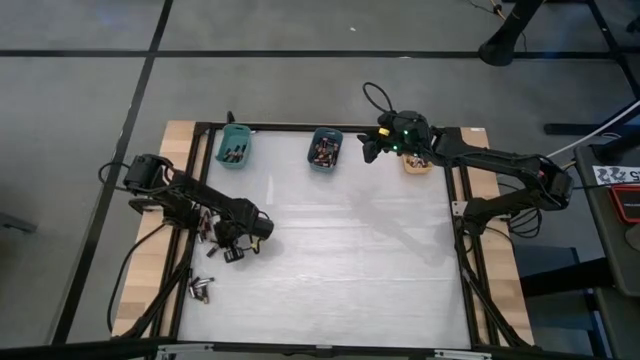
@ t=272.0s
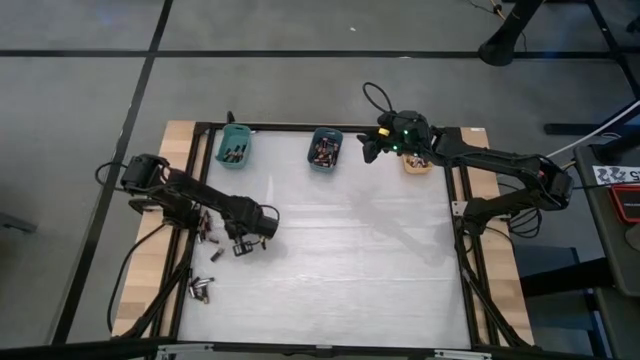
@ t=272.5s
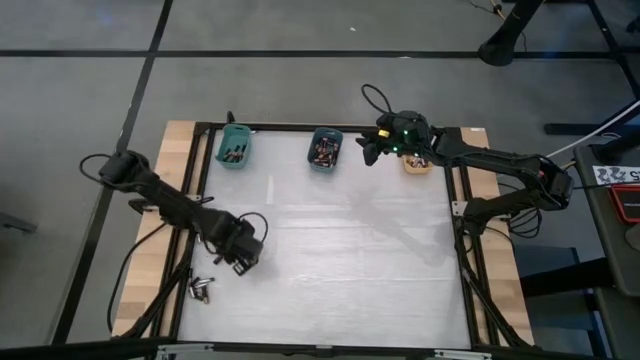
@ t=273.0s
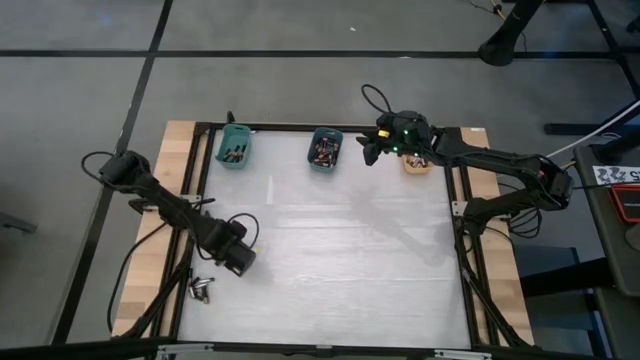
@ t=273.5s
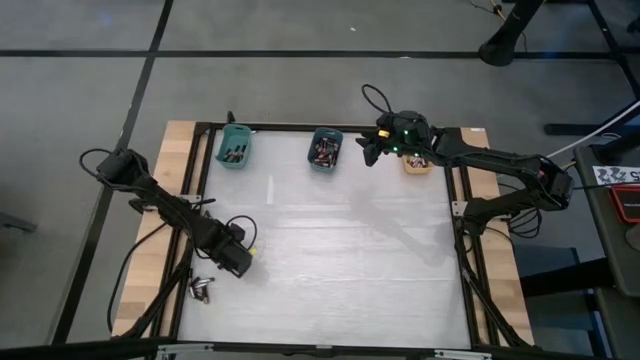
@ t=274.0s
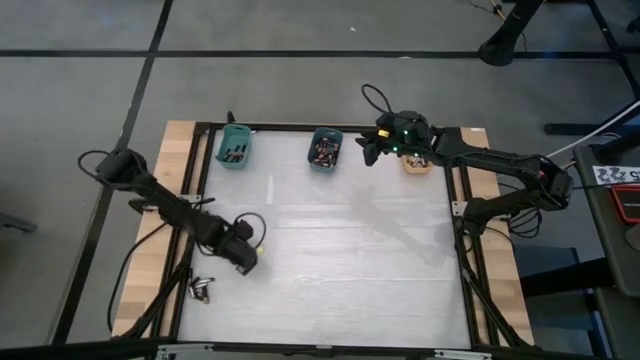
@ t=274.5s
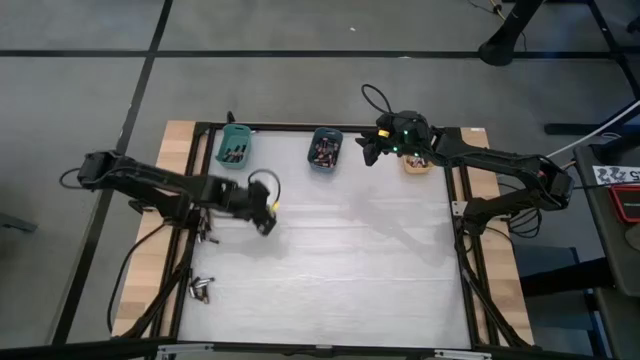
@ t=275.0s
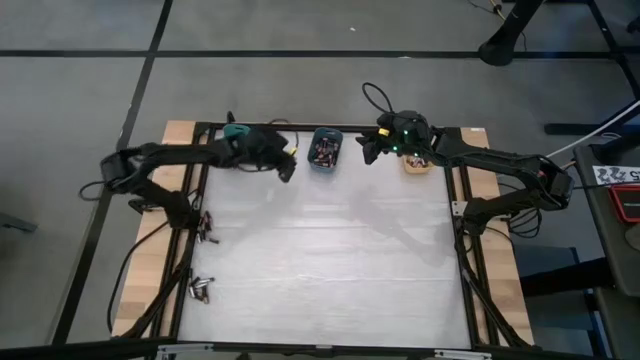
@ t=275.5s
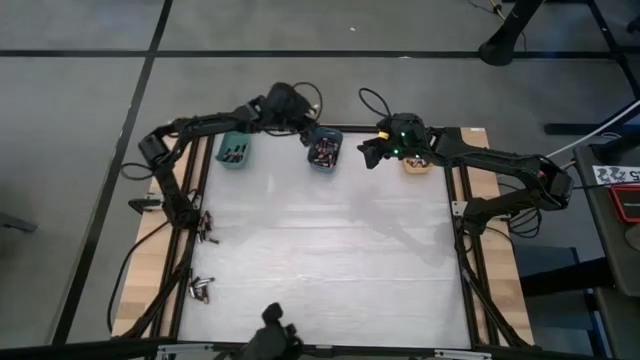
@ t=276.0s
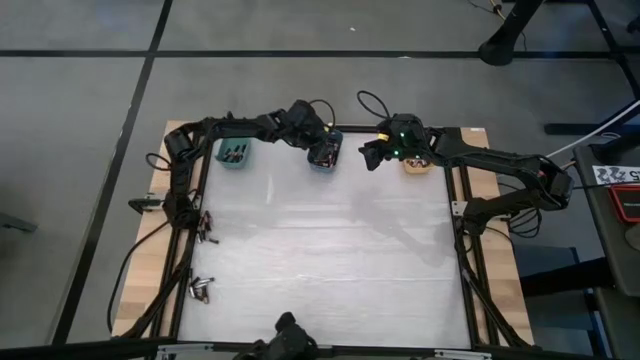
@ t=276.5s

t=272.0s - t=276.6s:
Task: Sort batteries
Put the brown battery into the blue bin

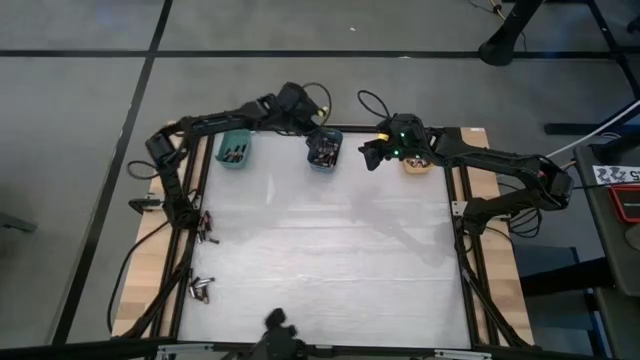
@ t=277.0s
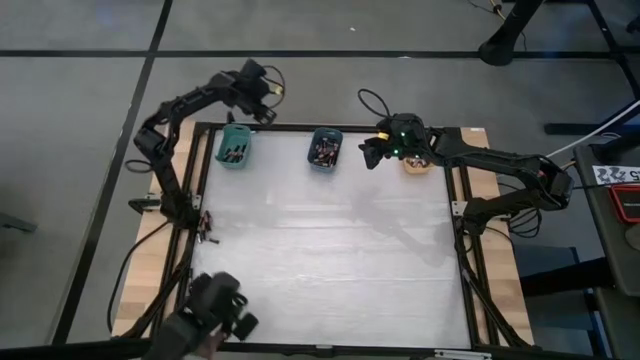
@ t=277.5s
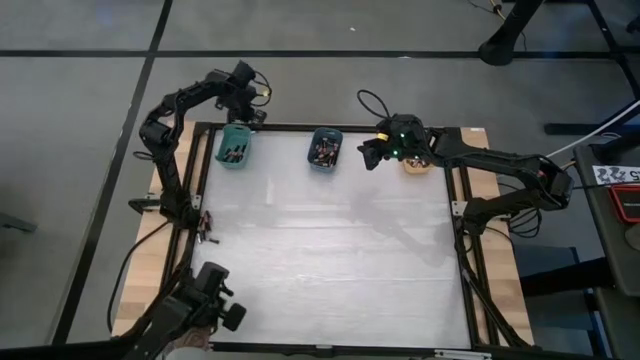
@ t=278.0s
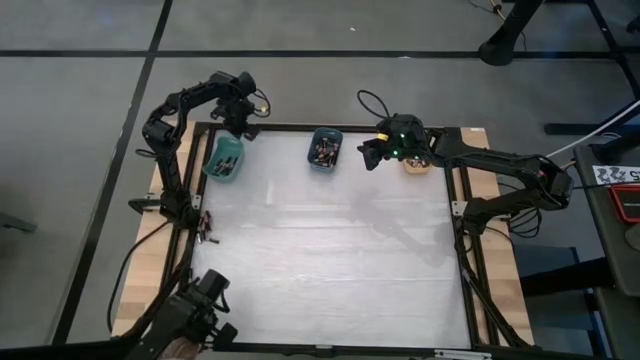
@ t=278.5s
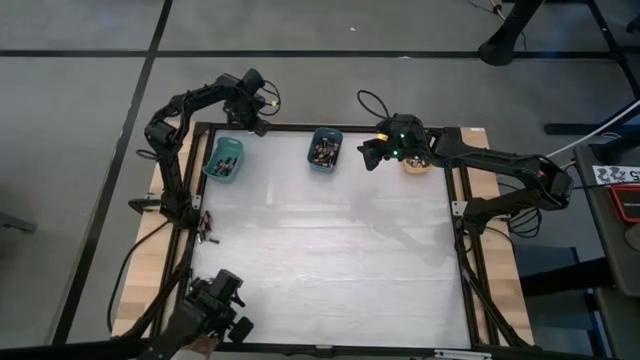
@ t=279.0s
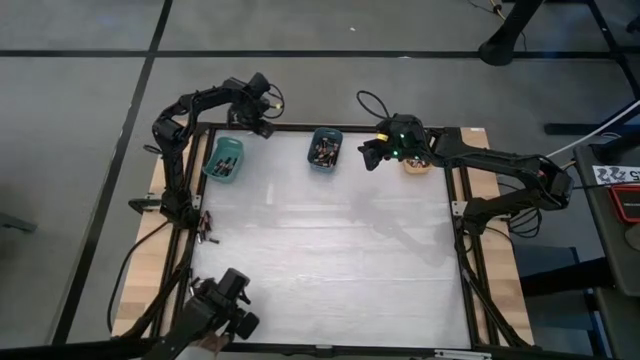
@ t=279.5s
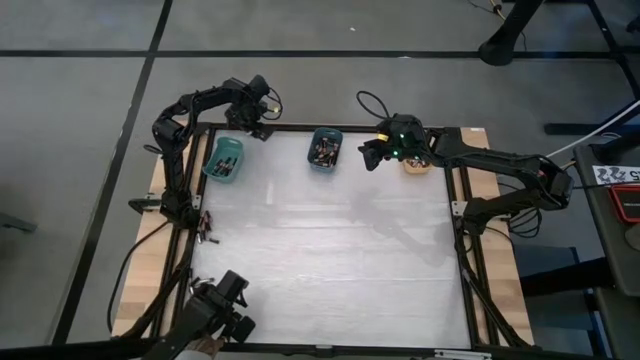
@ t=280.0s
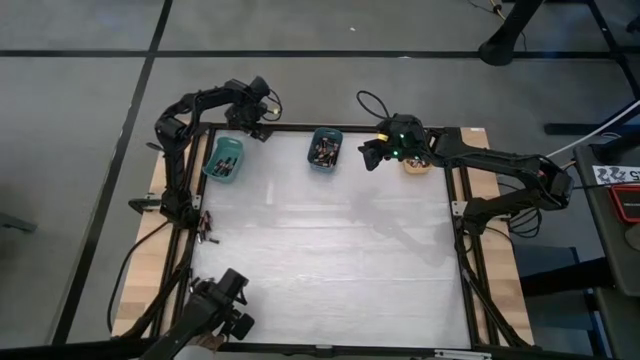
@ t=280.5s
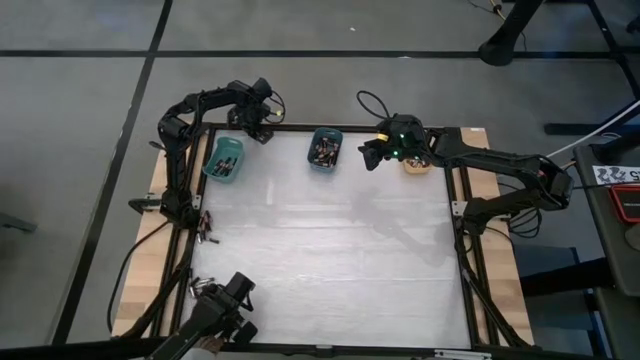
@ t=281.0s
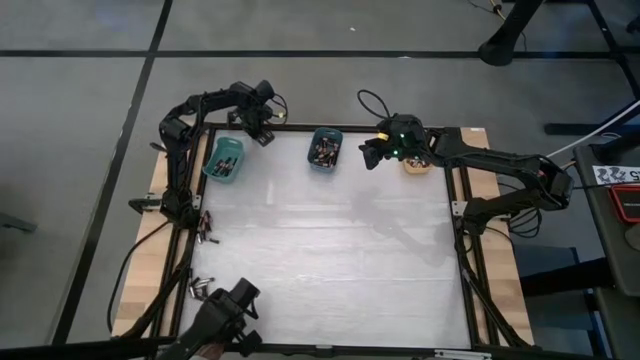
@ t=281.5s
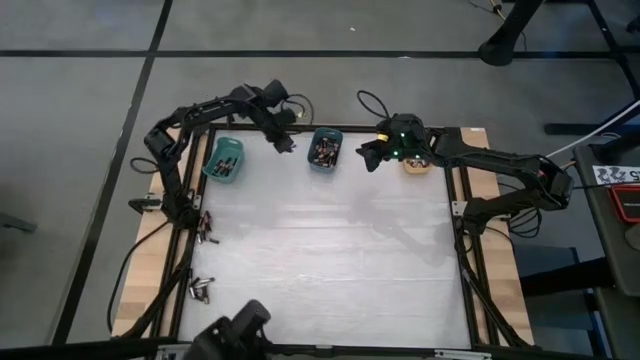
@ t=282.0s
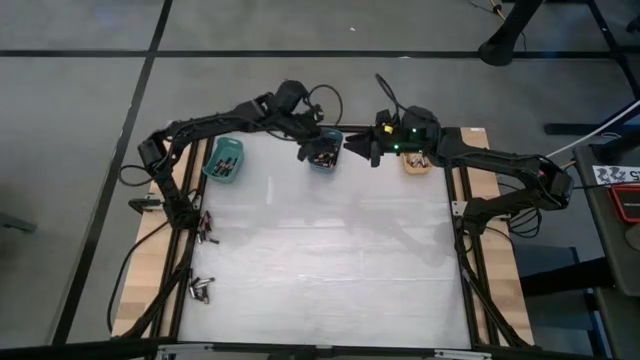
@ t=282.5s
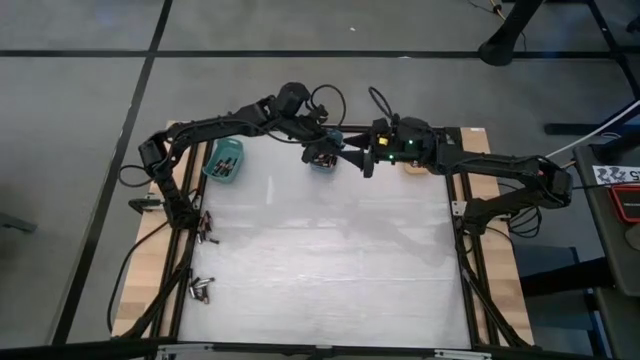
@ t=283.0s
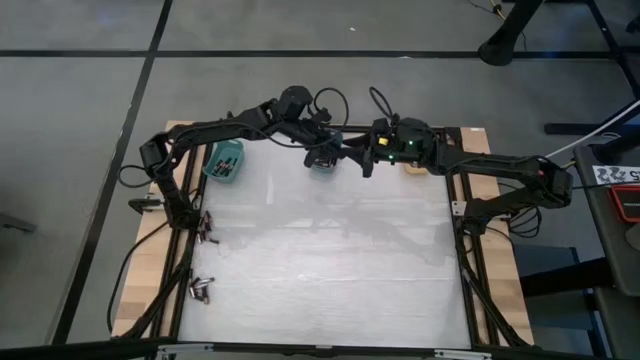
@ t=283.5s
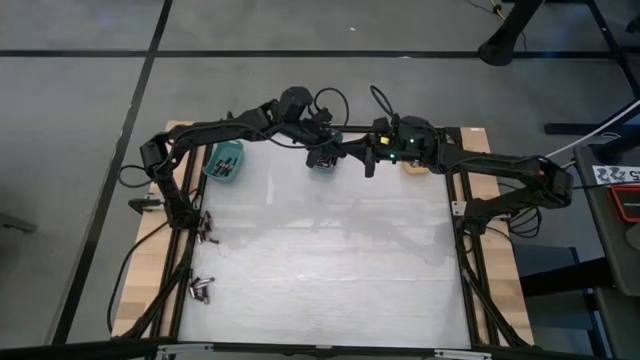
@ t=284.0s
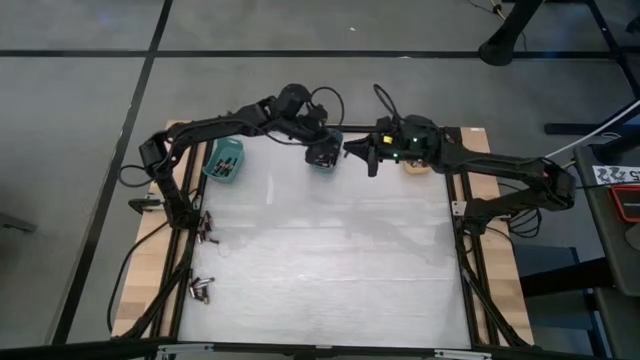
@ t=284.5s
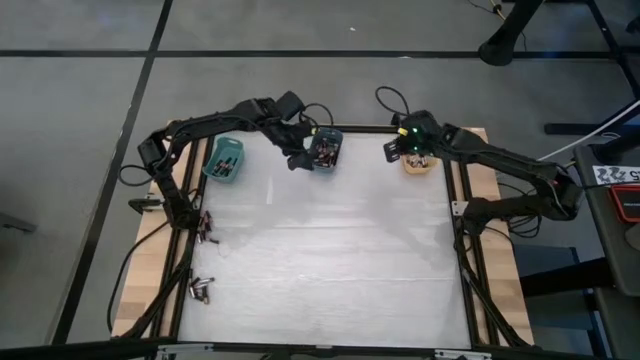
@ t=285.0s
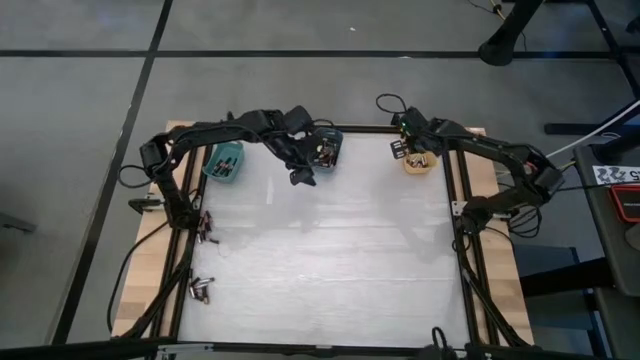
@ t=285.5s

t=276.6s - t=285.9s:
Put the silver battery into the yellow bin

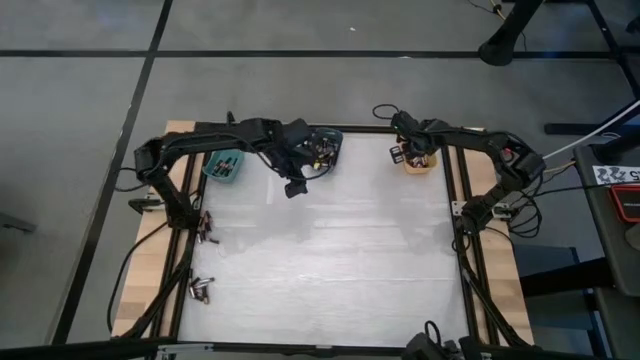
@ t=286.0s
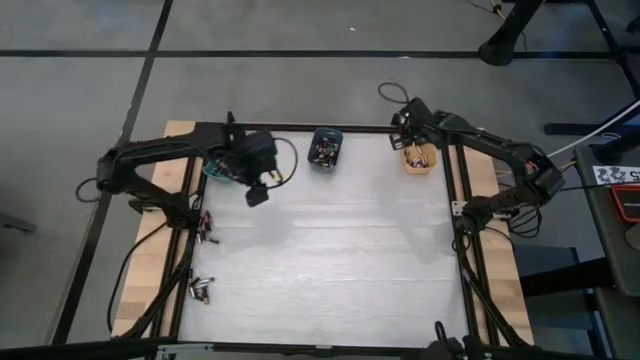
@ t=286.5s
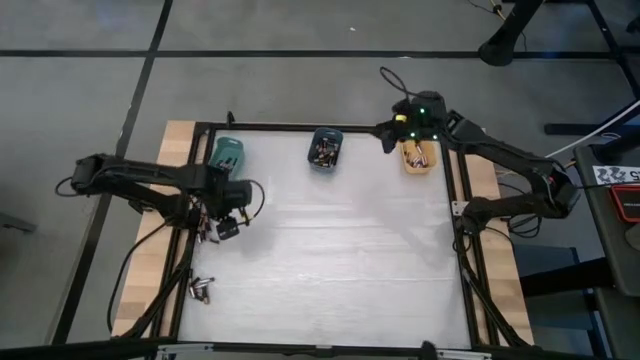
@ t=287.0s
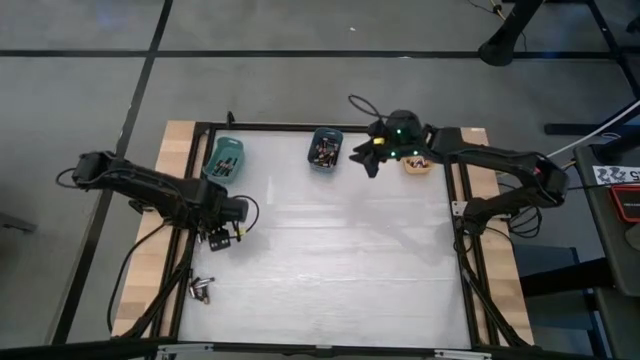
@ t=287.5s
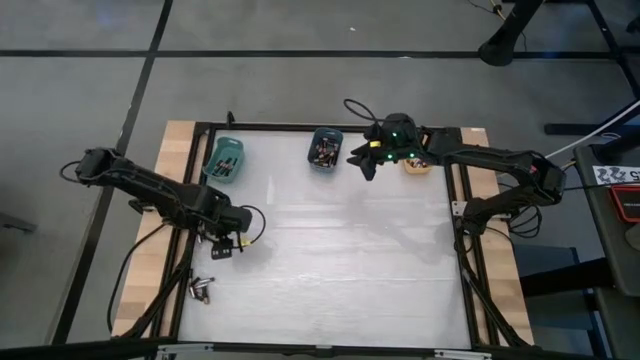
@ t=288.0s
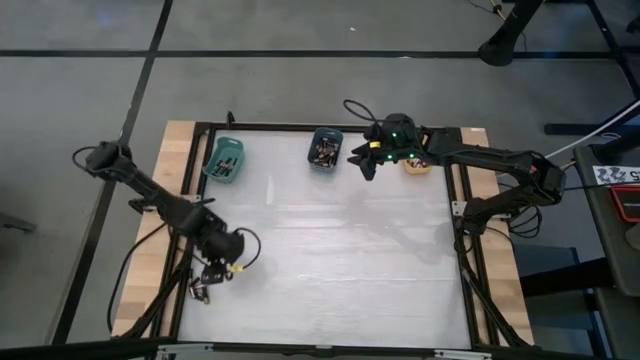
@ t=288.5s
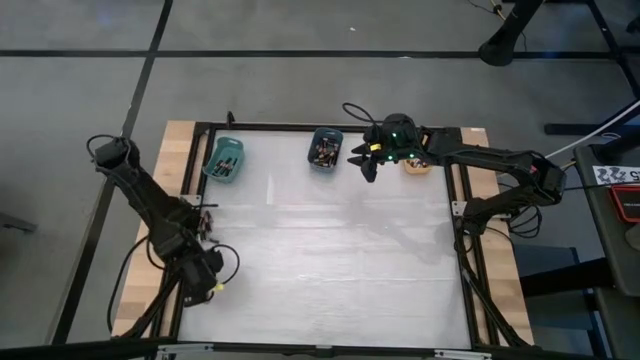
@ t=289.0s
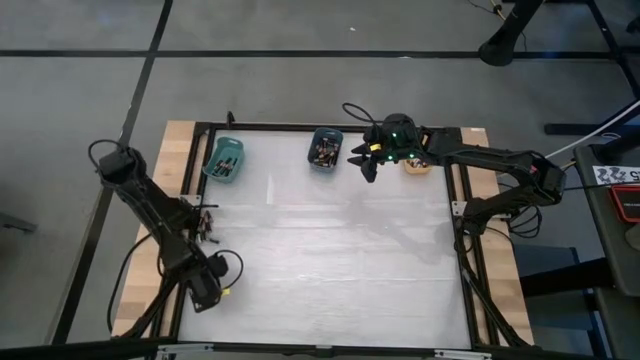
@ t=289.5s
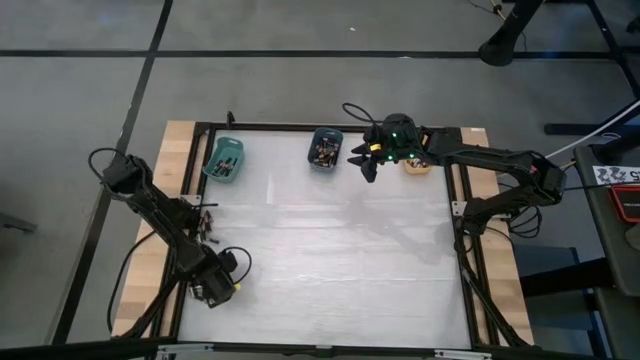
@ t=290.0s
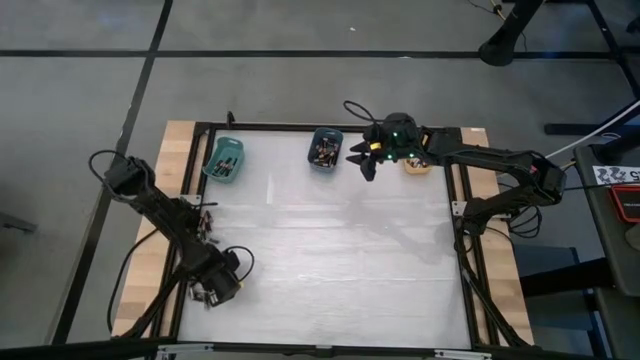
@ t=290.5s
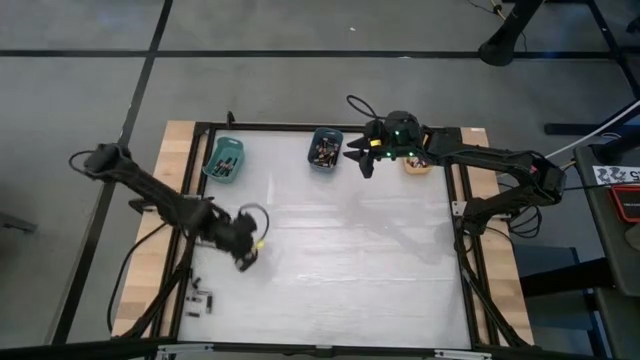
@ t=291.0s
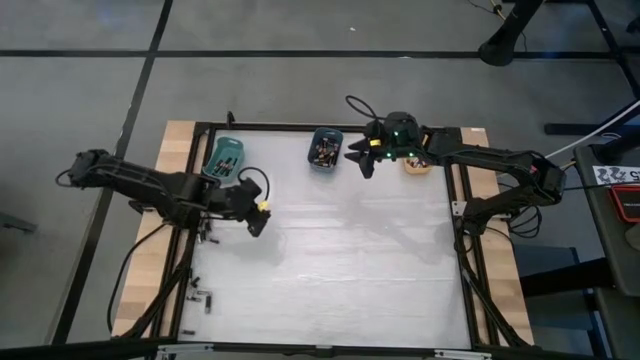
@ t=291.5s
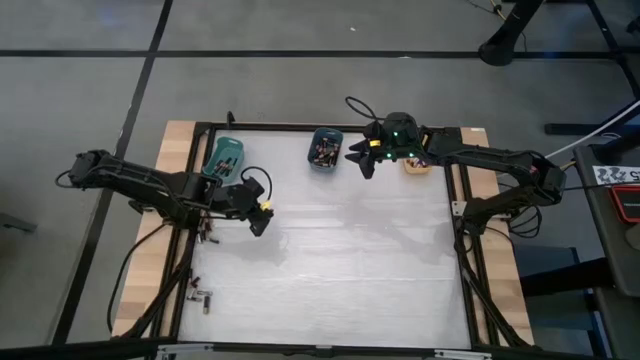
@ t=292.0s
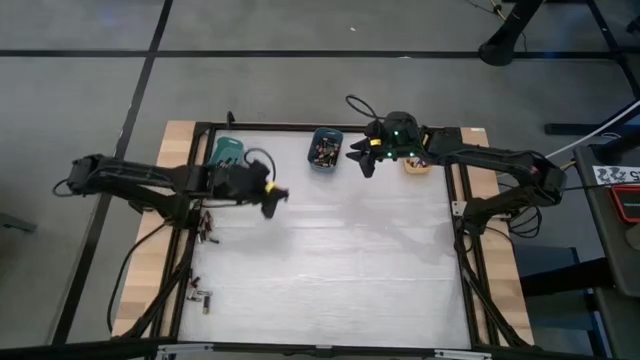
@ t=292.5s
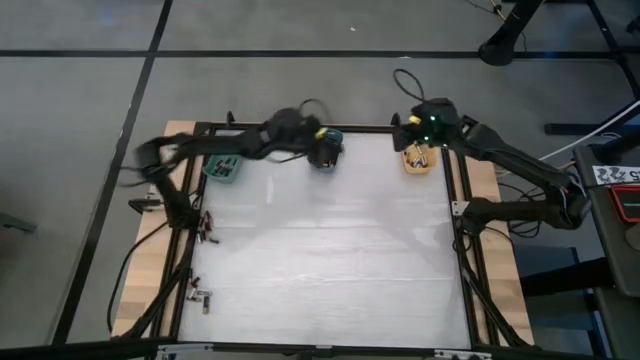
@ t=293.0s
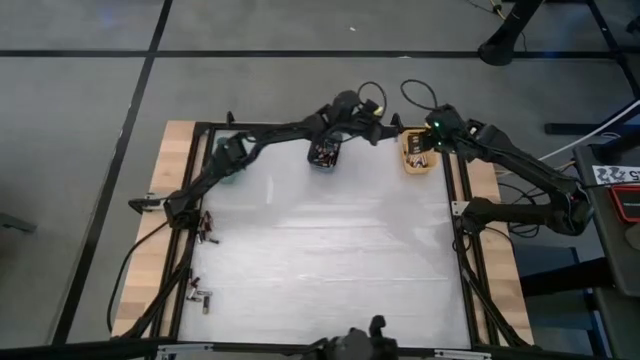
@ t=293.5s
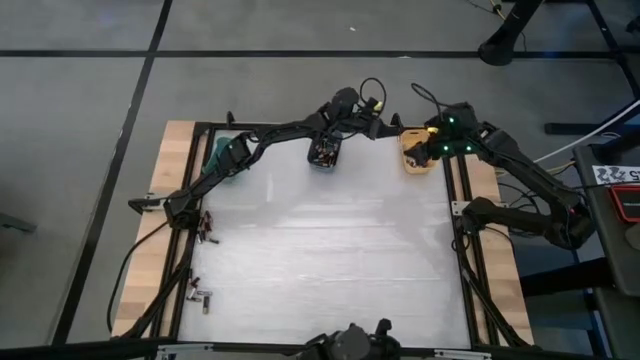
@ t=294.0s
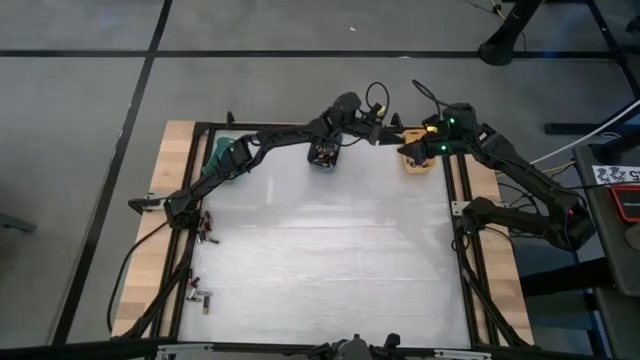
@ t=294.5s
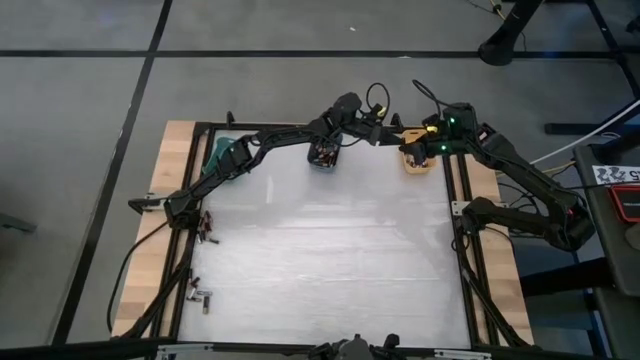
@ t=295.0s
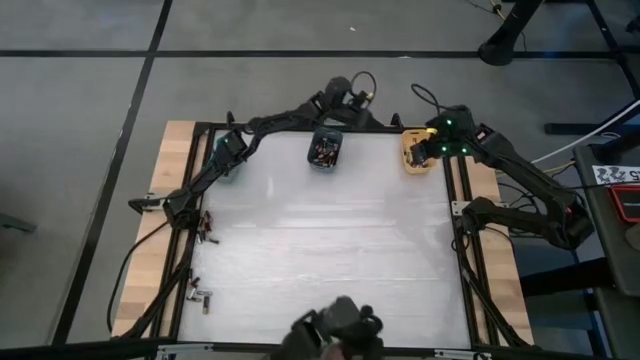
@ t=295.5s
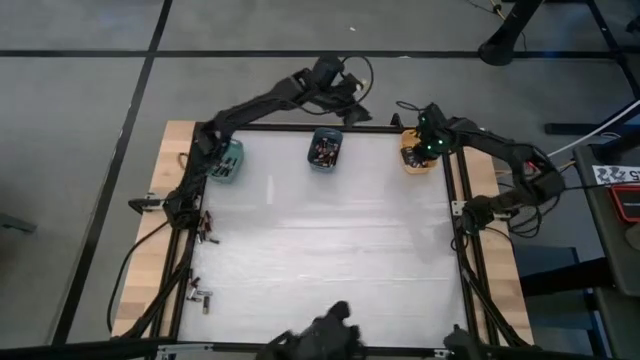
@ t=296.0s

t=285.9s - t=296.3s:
Put the silver battery into the yellow bin
